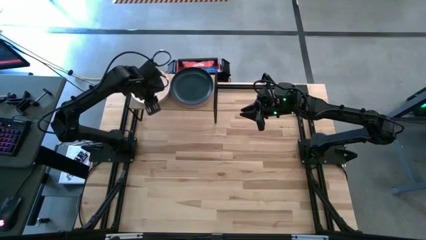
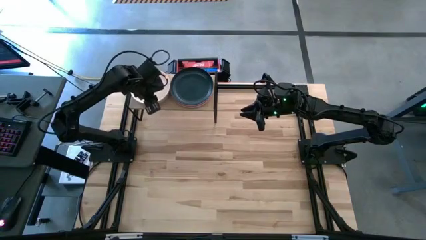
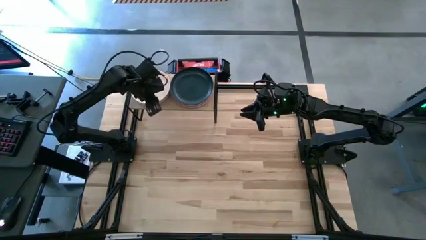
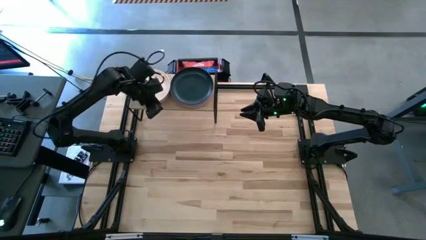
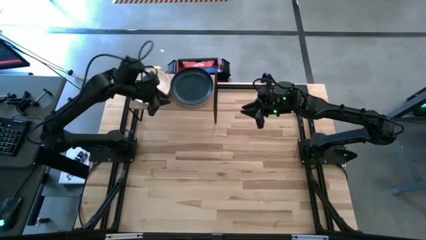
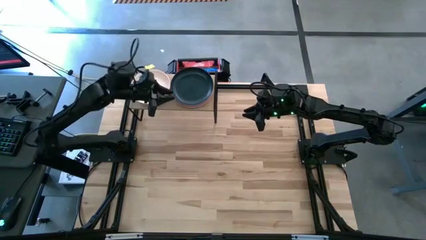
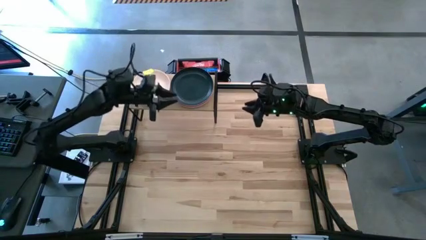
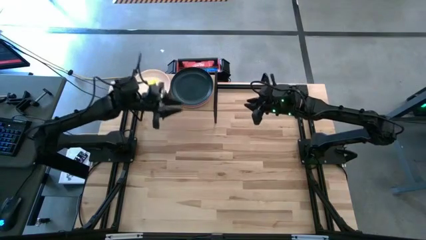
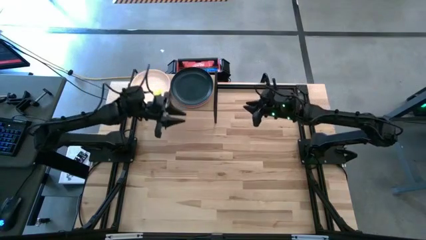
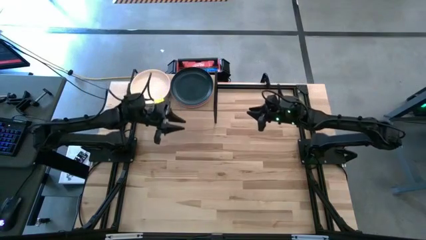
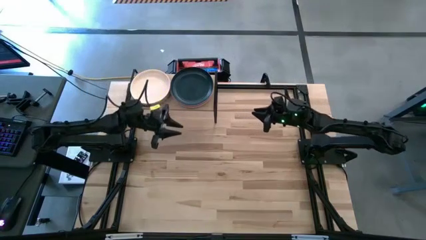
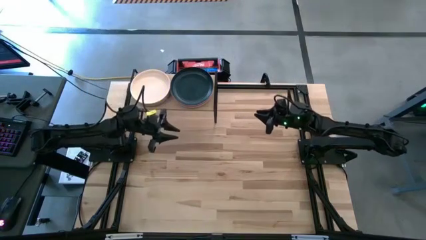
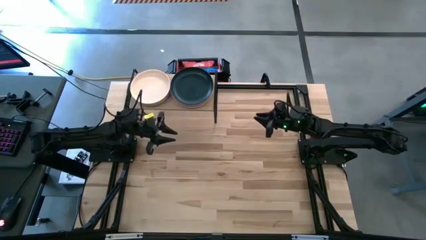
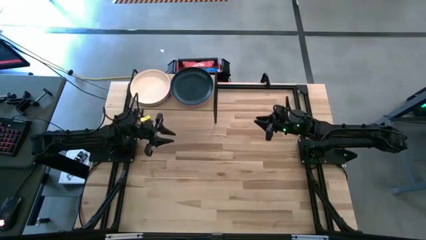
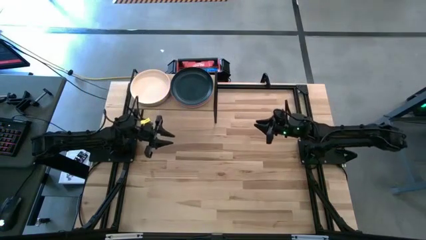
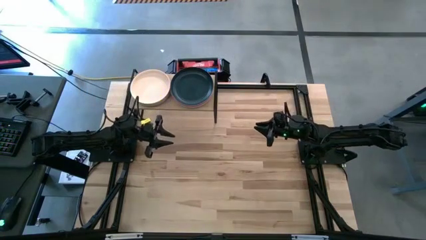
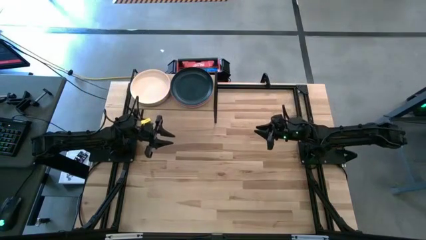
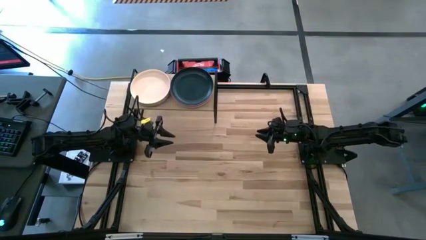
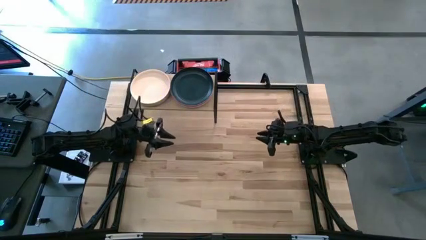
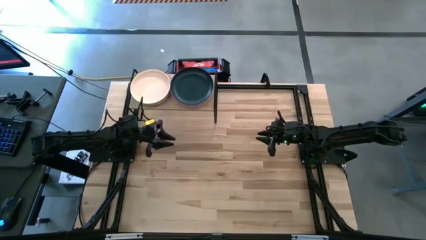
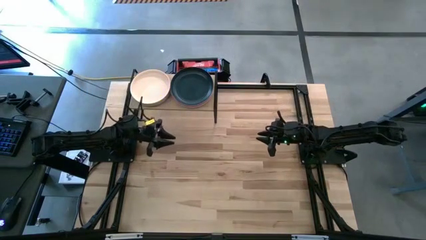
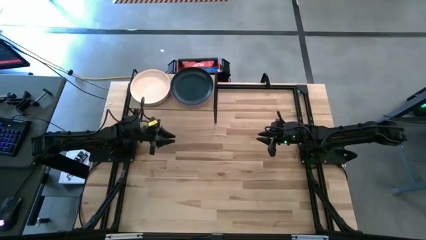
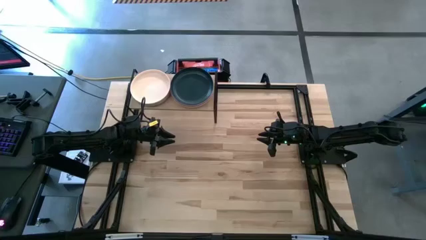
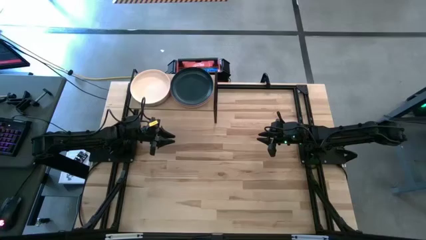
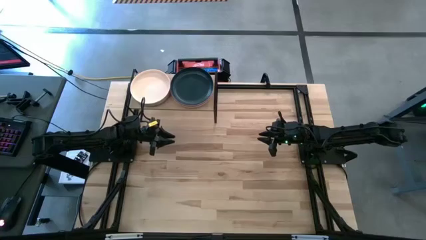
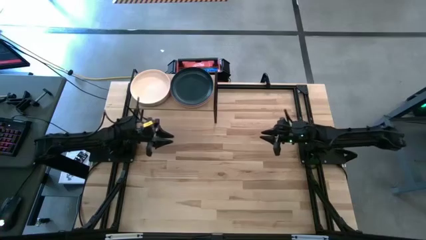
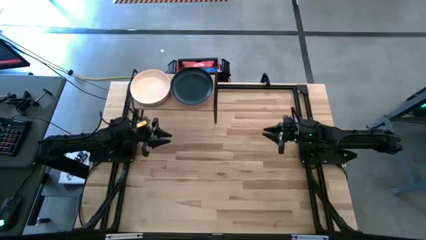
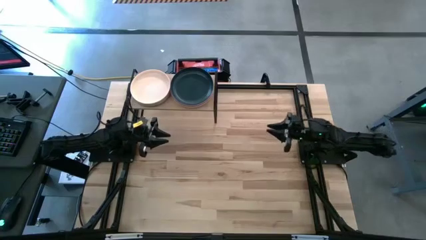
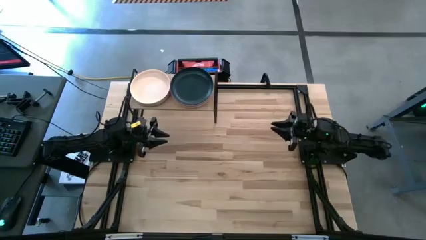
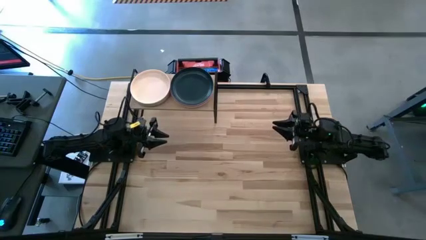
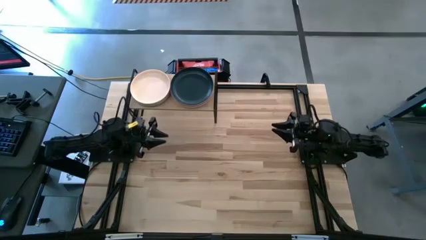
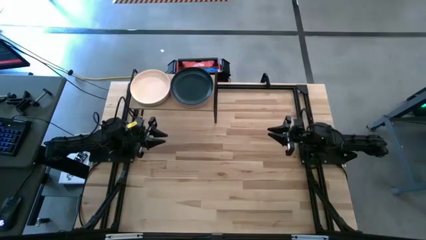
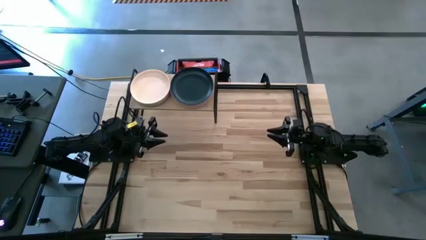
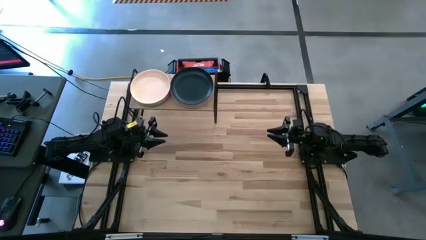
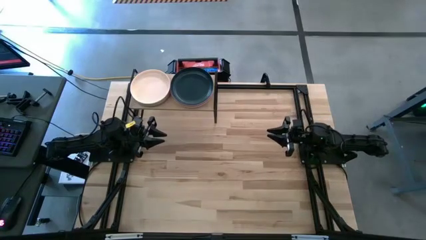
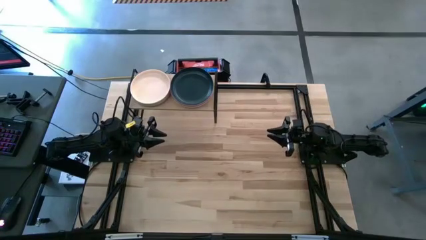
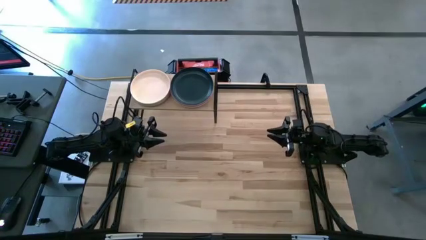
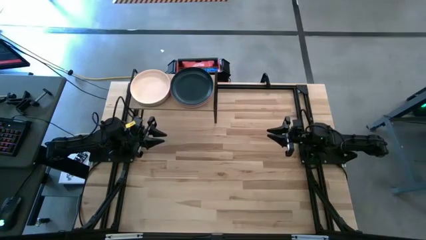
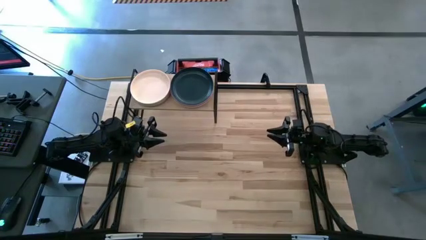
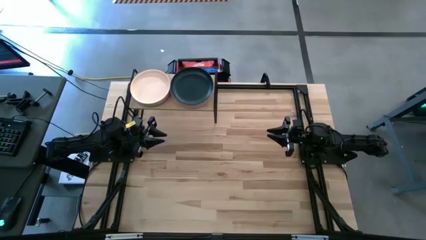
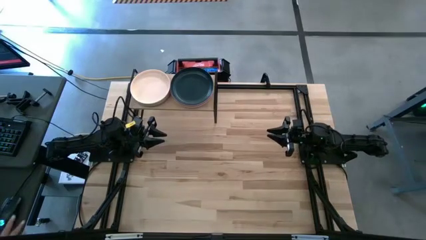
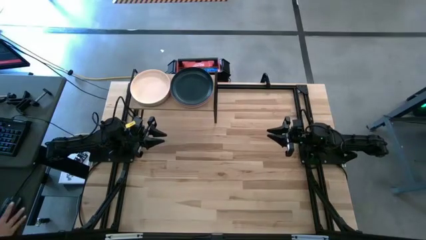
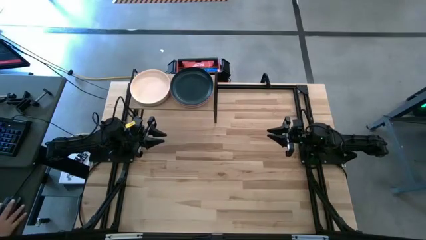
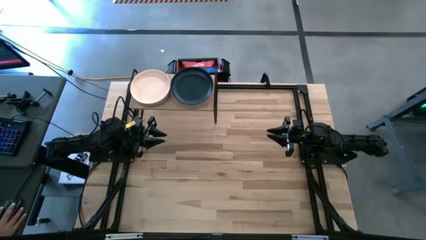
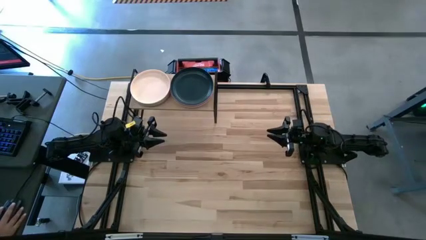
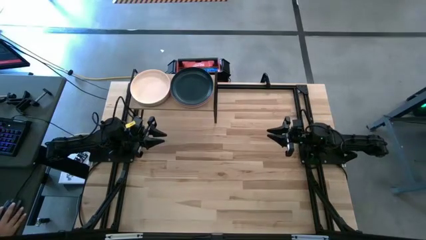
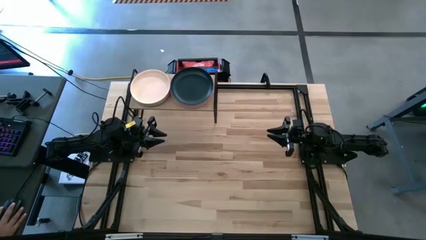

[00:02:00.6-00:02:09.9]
Task: Place and stack plates onto a shelf
Return to Home Position

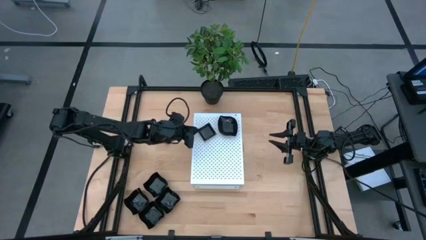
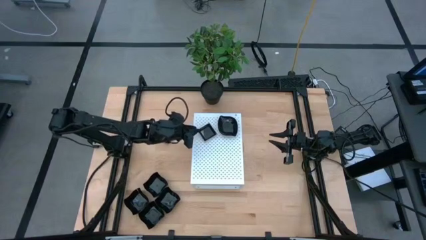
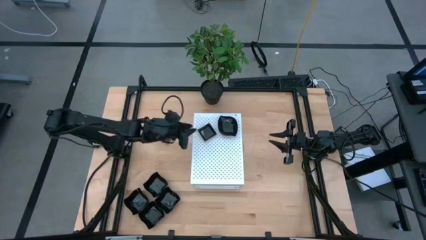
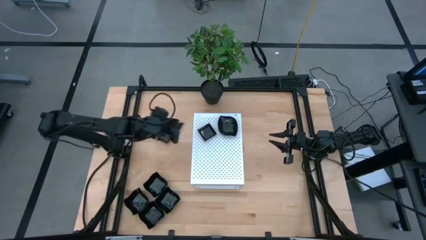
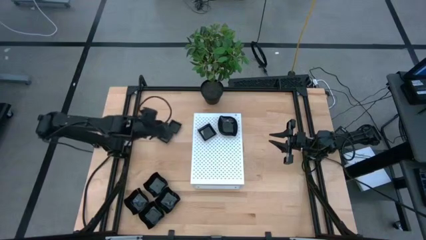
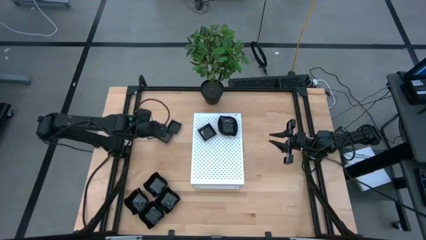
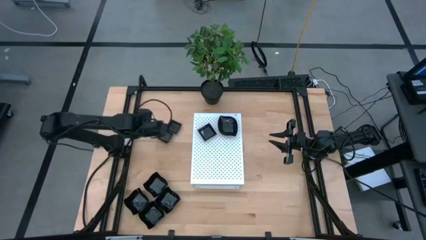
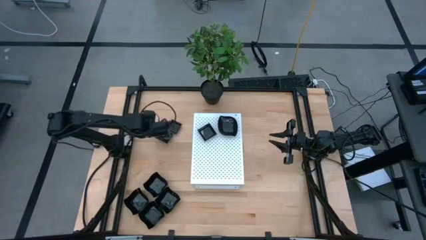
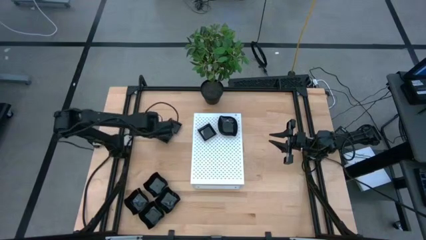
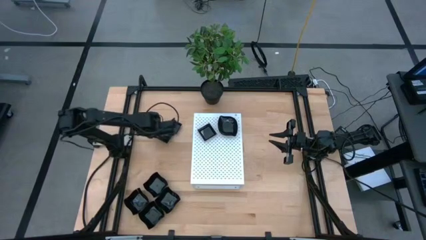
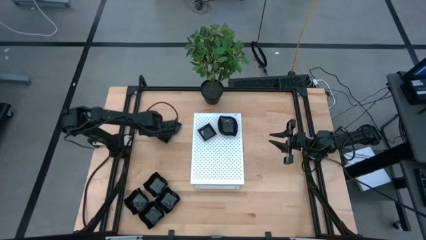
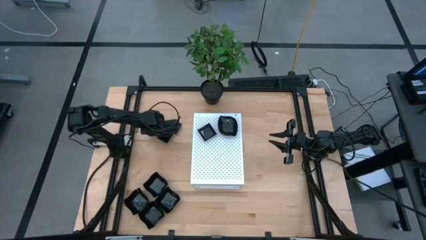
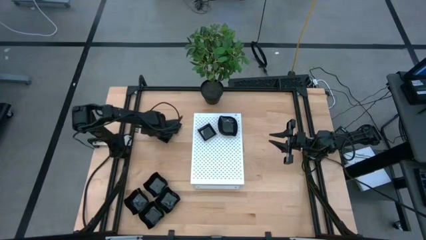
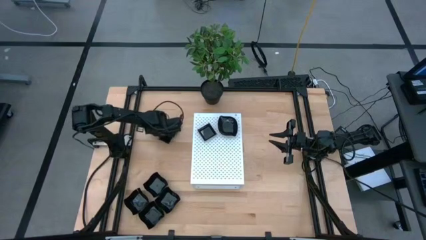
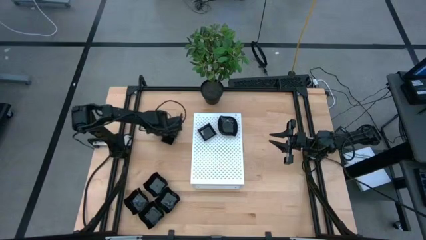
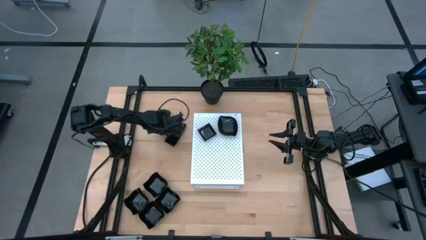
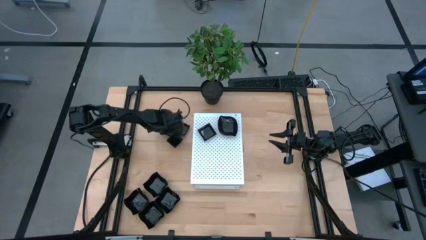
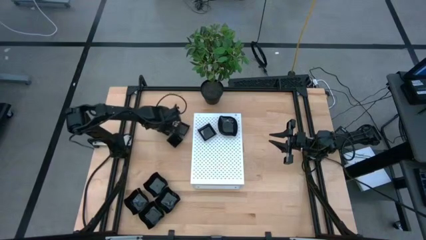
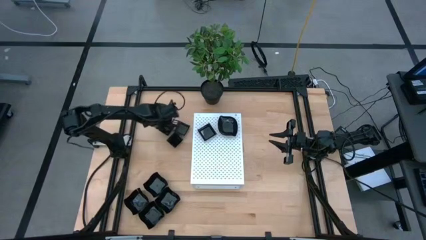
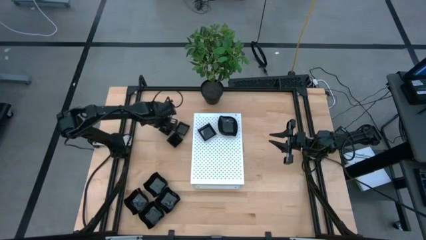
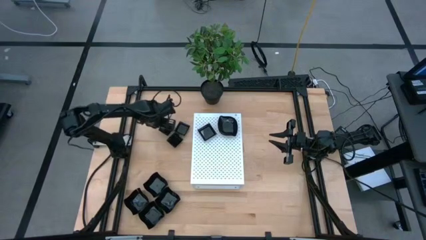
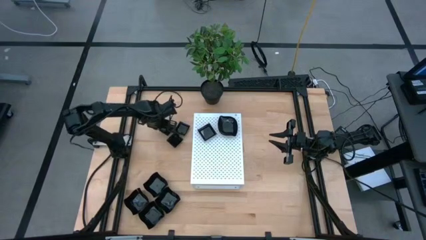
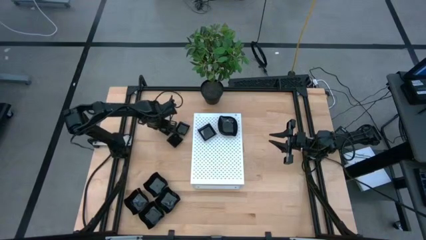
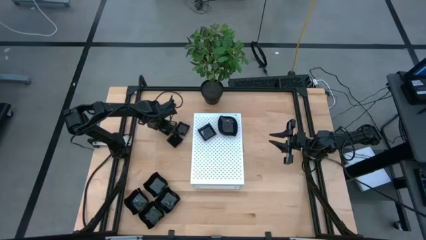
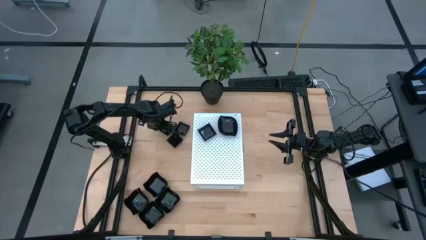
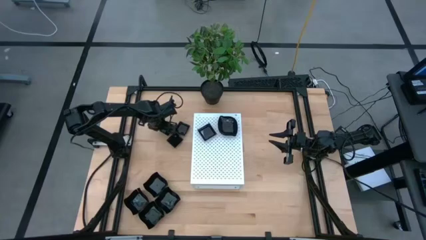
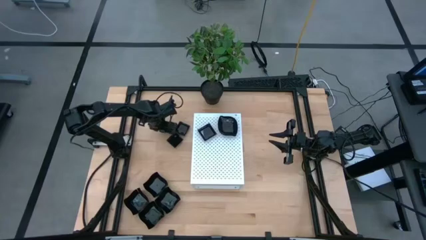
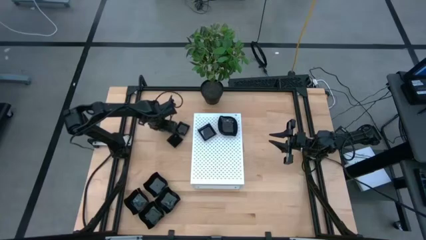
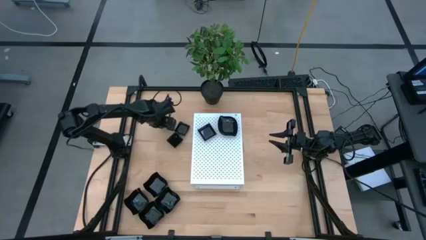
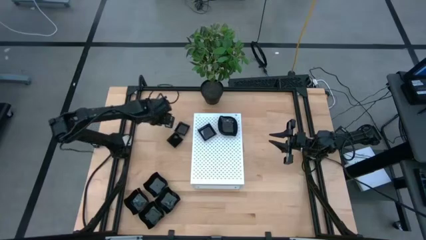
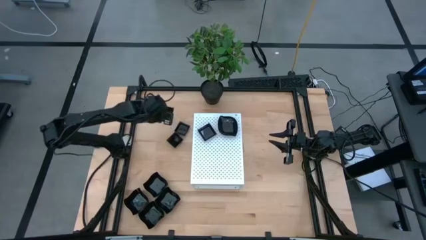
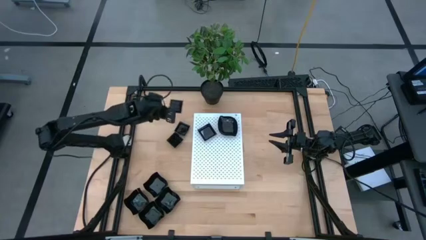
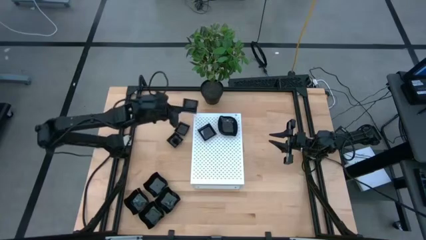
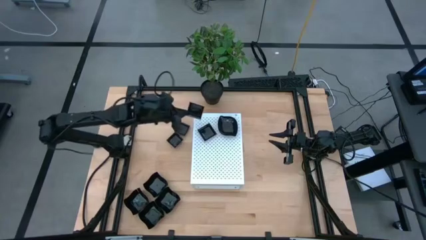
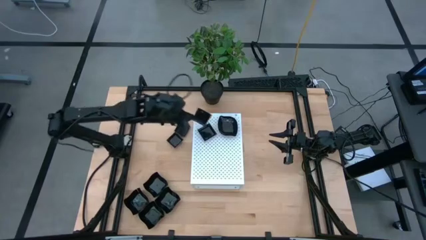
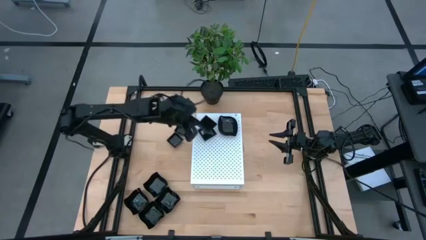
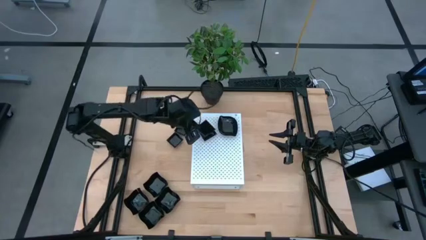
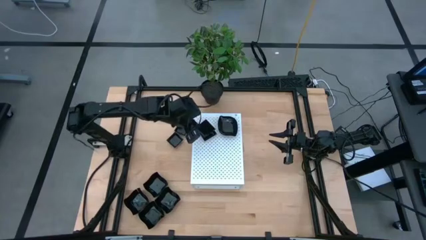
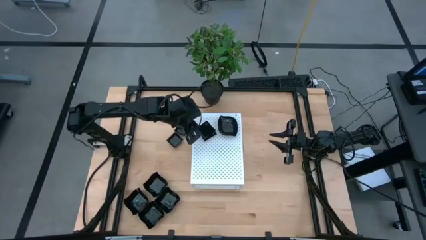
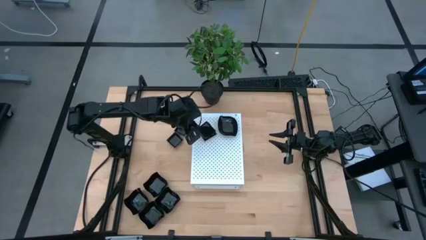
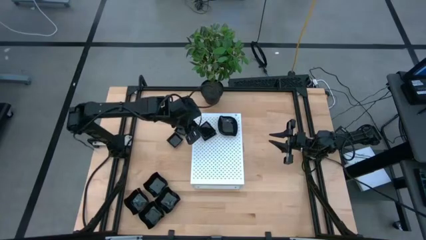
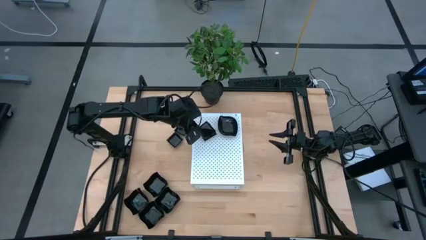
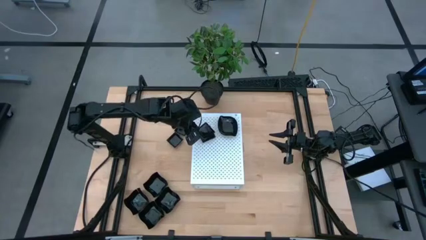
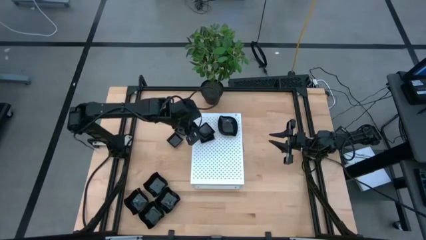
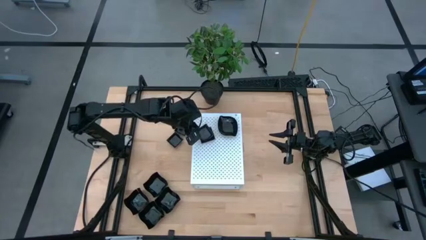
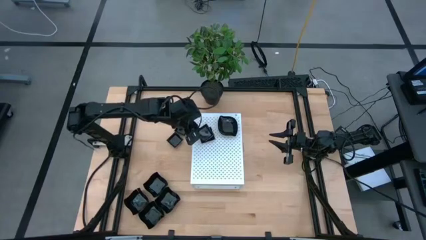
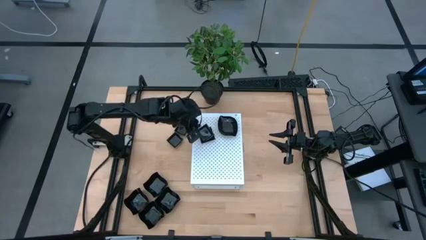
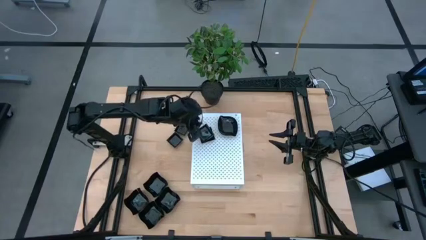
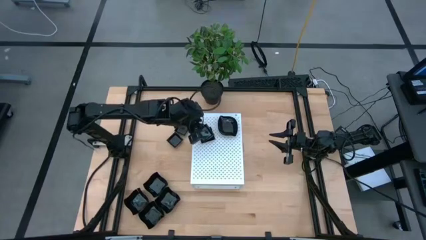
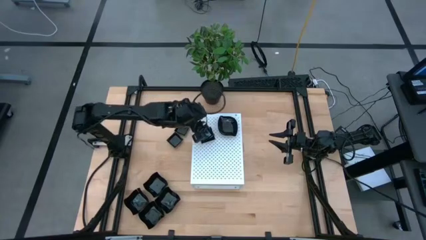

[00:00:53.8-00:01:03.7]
Task: Pick & Place Mini shaped plates
Stack the black square plate on top of the the black square plate on the shelf
